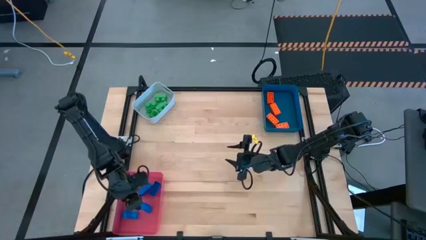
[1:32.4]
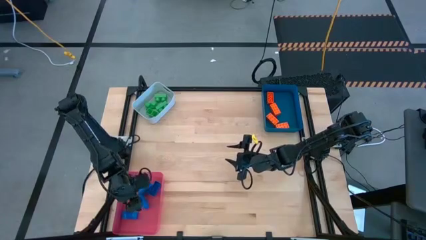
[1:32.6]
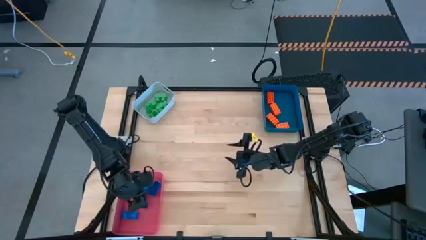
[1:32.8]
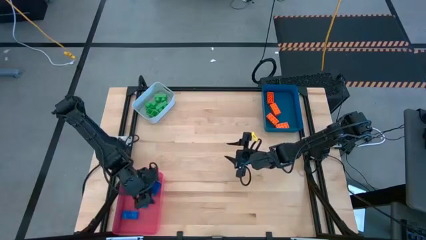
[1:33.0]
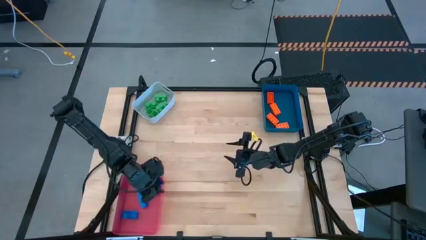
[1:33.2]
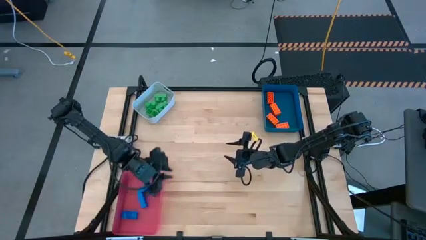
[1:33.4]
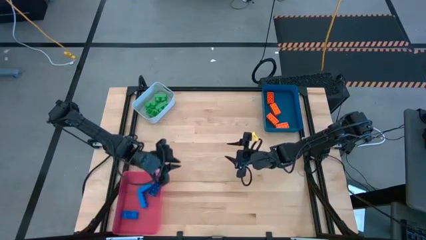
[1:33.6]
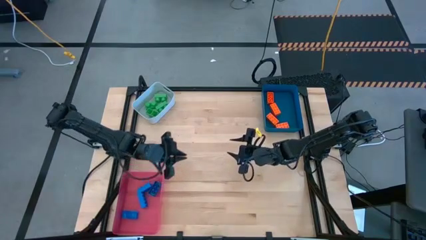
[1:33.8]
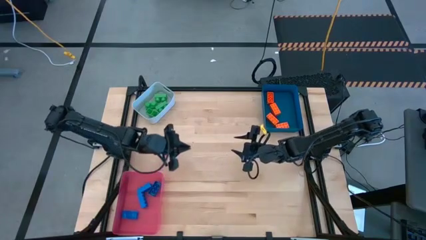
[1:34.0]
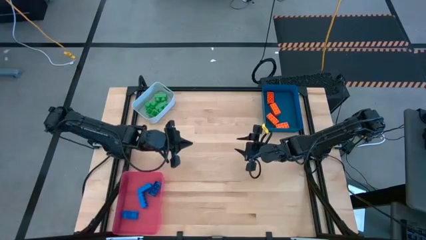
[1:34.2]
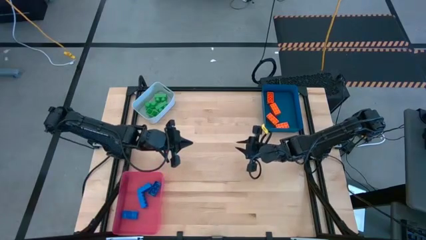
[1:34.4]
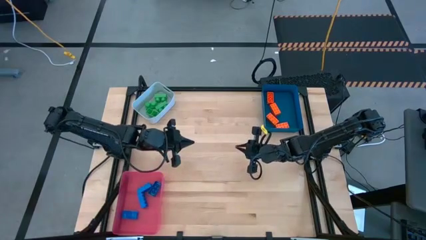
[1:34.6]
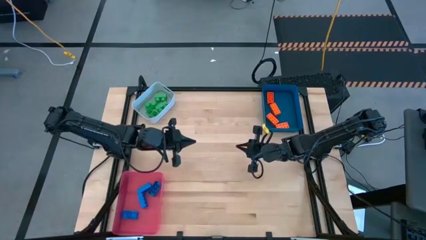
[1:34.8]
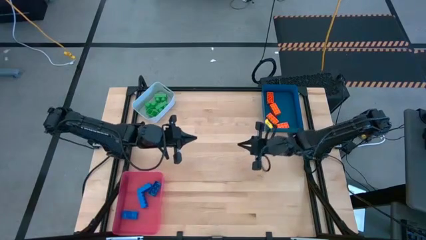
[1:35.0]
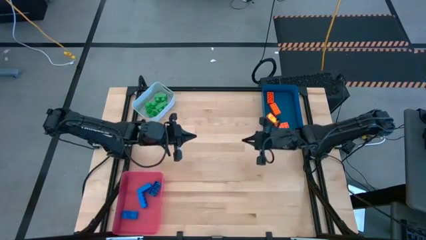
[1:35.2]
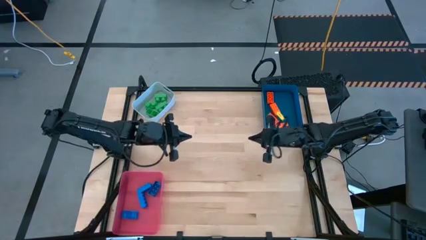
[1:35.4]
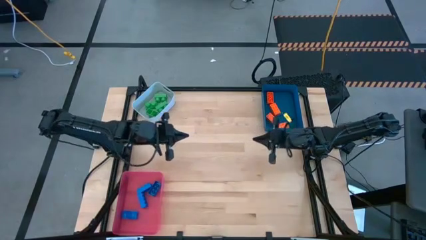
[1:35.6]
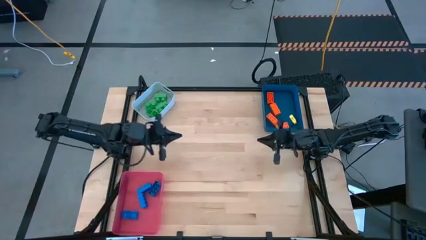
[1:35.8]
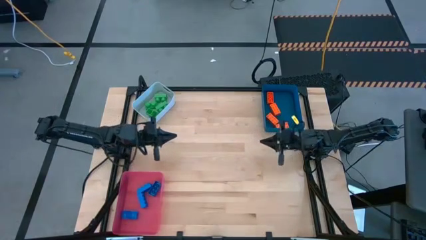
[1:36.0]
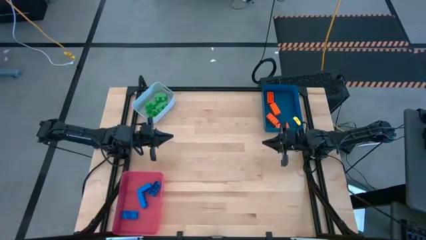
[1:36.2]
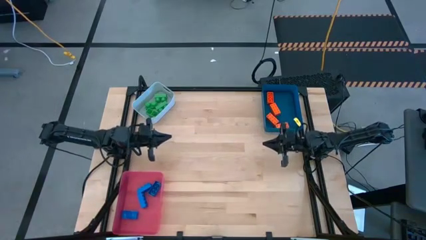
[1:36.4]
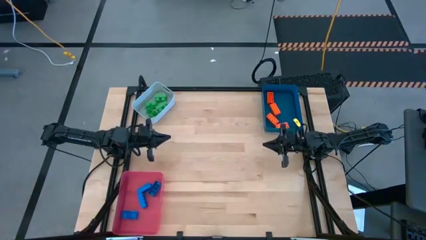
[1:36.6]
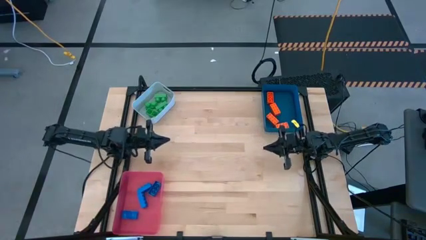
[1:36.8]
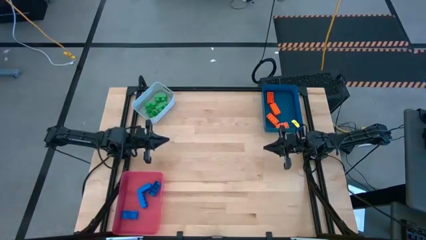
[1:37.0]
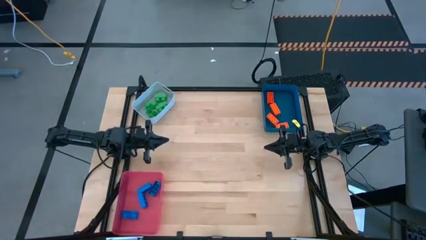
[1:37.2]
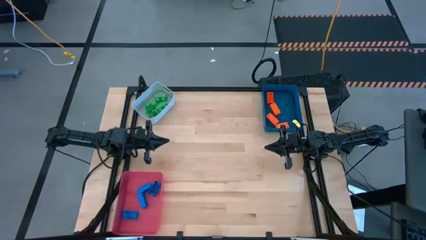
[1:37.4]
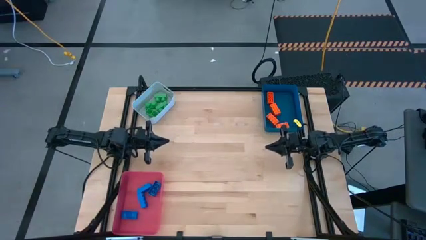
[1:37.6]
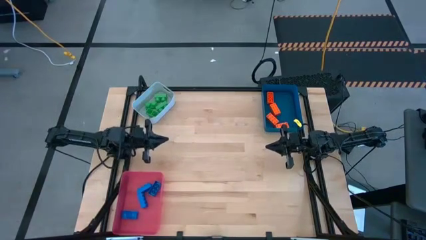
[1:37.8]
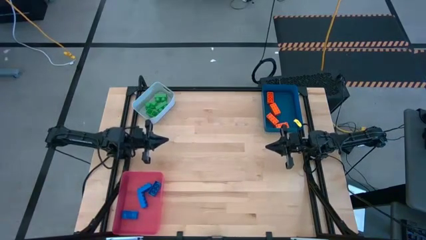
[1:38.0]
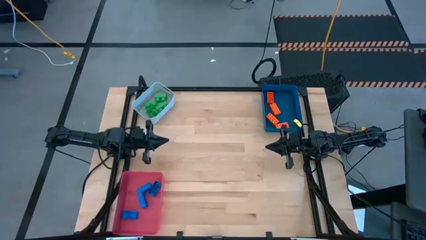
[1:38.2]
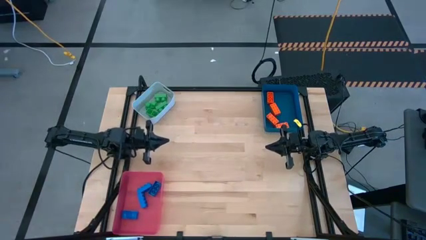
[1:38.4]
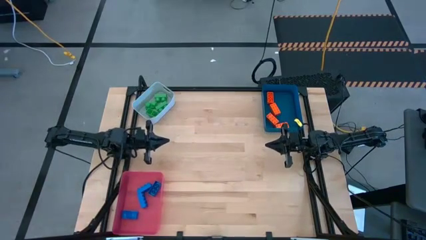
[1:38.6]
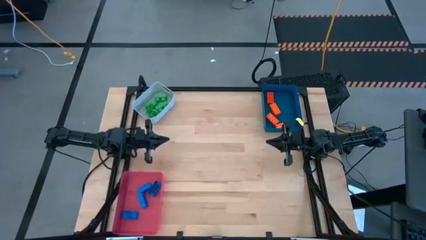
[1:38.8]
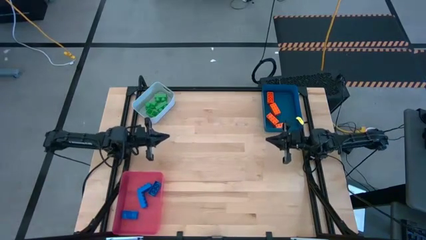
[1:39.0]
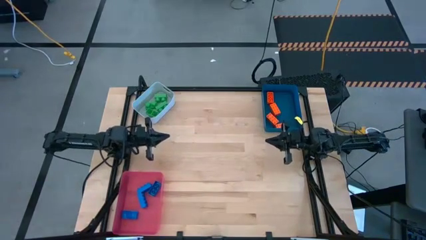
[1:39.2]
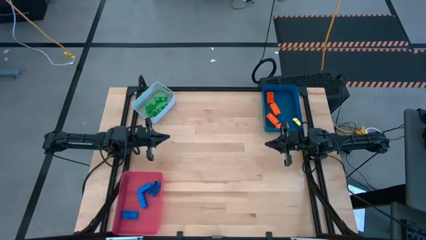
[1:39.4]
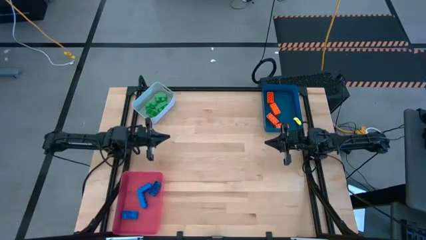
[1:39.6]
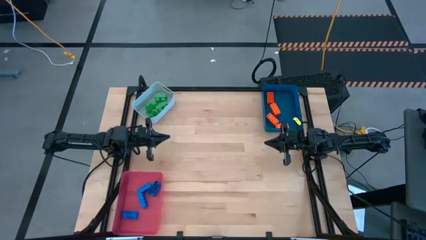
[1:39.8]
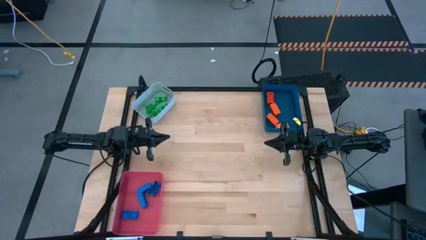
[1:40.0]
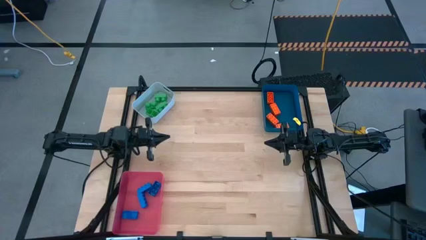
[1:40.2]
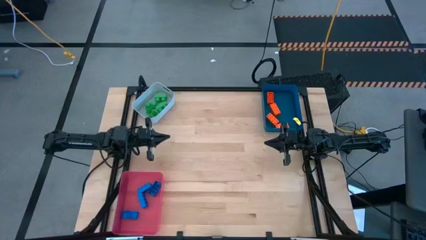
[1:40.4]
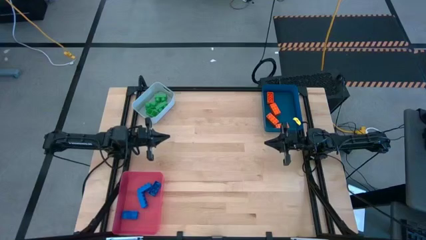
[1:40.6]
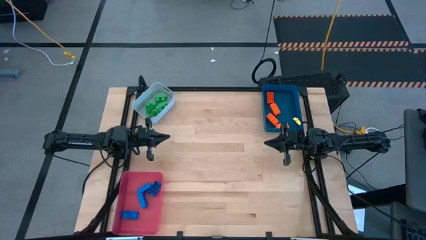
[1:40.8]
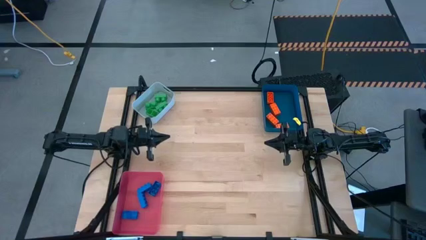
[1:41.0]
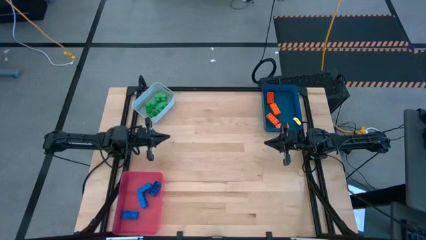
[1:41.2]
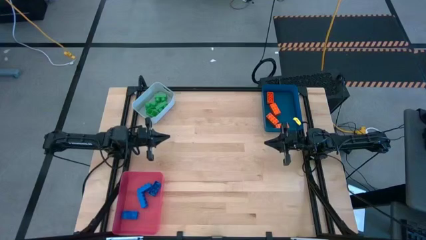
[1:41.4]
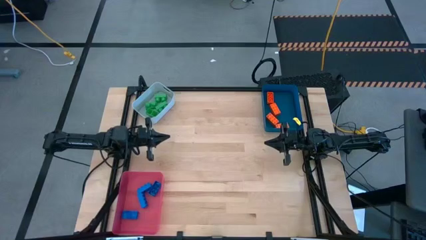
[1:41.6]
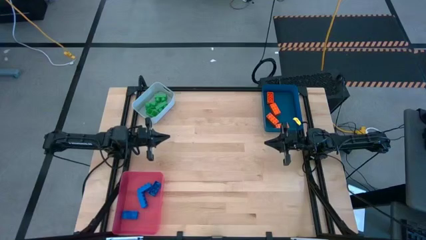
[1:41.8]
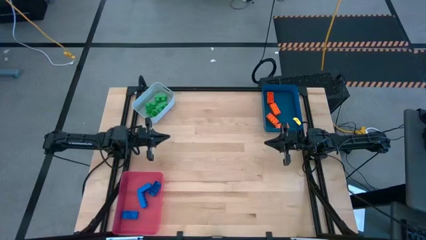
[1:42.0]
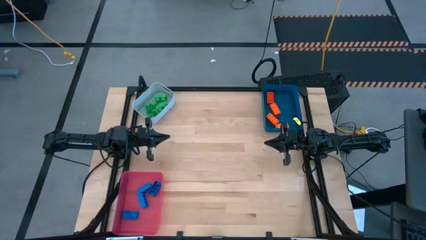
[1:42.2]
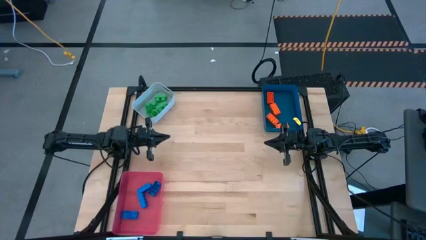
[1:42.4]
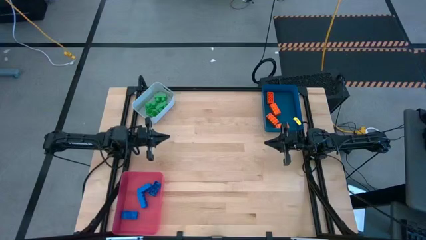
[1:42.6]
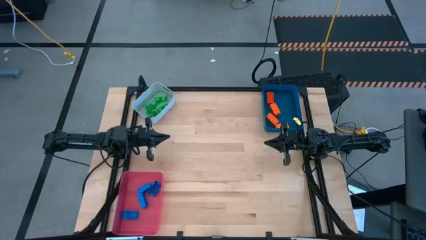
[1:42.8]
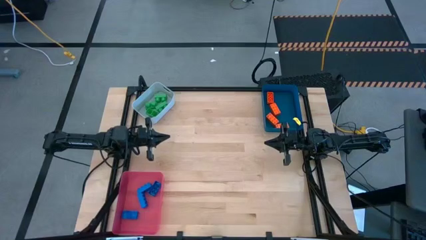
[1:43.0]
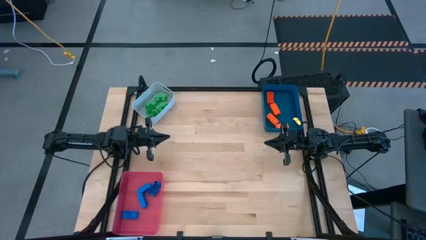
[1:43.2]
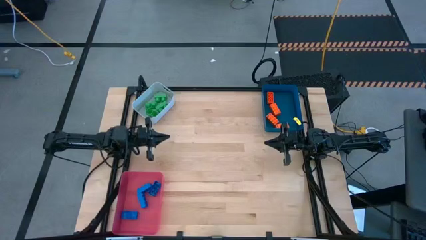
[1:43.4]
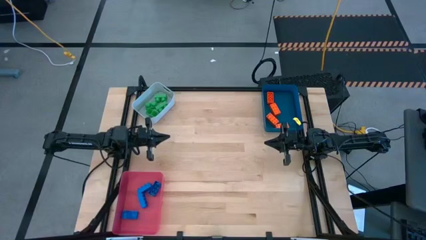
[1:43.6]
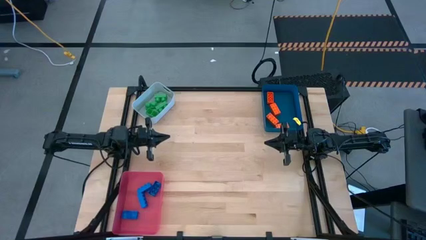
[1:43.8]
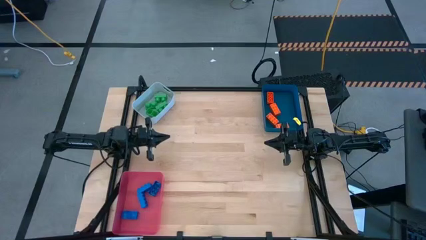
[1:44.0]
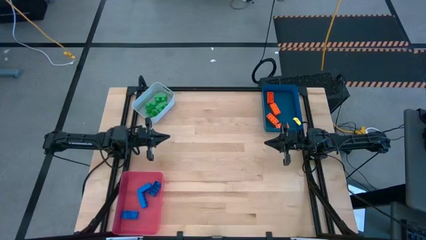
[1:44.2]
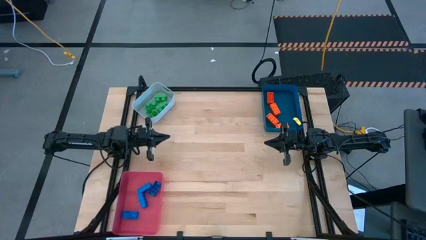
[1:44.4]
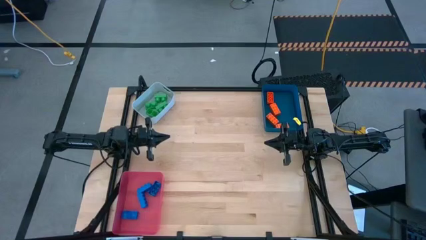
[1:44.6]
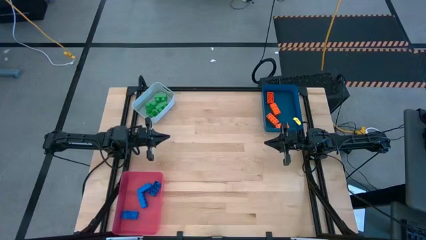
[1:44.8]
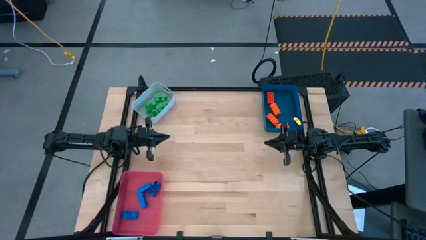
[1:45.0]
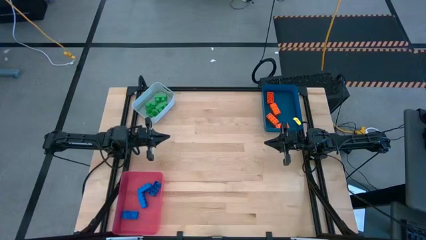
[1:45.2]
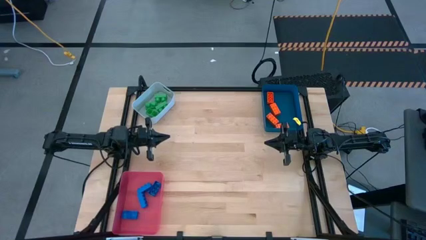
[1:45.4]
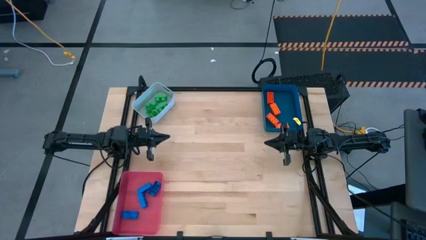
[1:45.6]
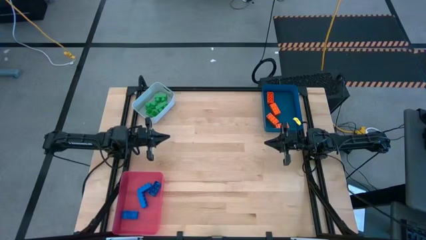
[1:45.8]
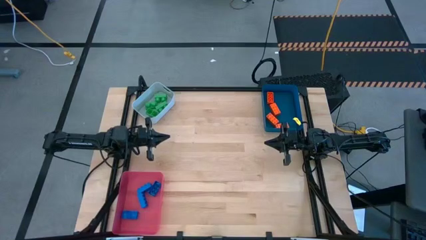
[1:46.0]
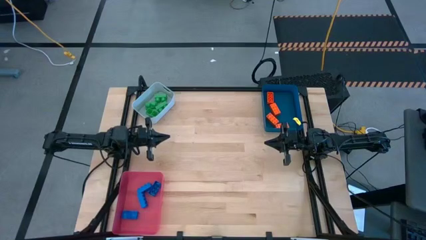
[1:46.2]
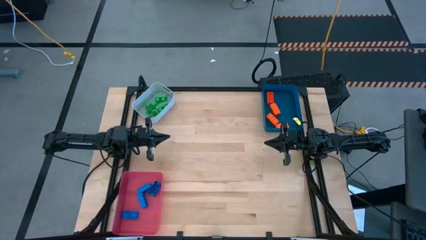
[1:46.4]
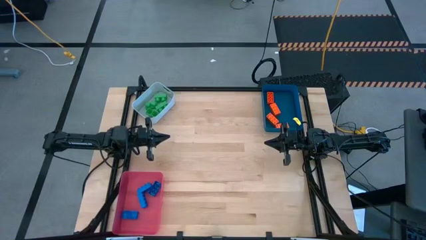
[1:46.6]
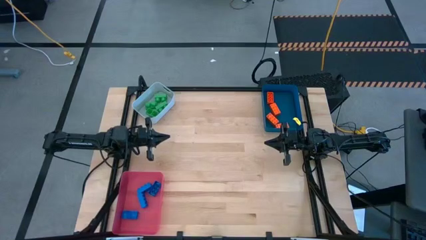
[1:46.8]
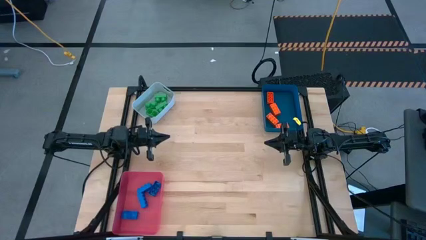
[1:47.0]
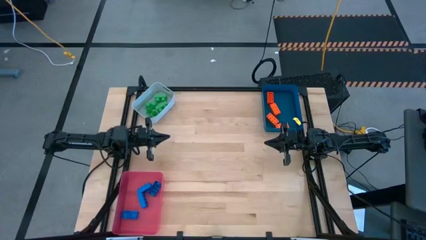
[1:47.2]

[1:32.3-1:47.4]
Task: Sort & place blocks by color
Return to Home Position

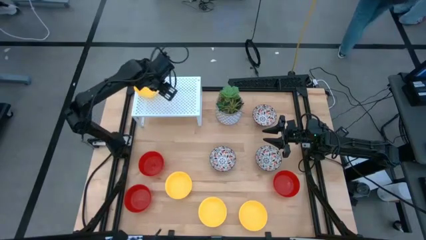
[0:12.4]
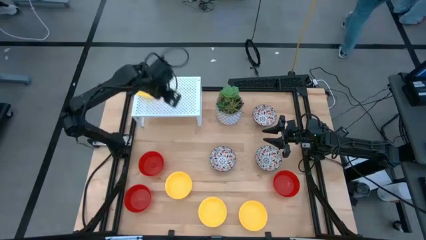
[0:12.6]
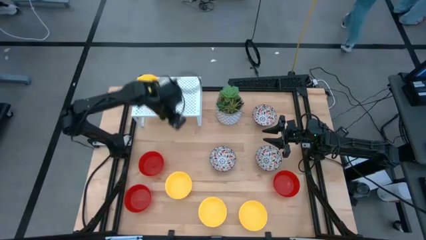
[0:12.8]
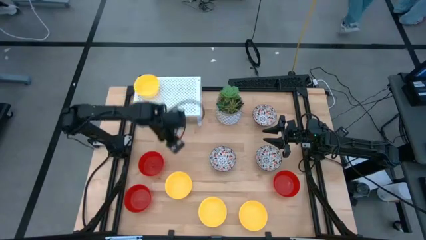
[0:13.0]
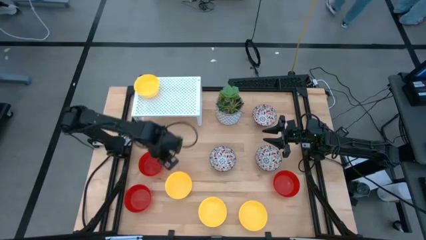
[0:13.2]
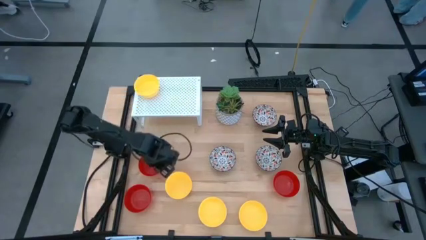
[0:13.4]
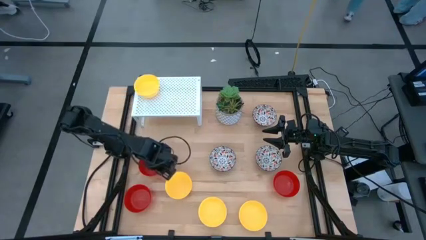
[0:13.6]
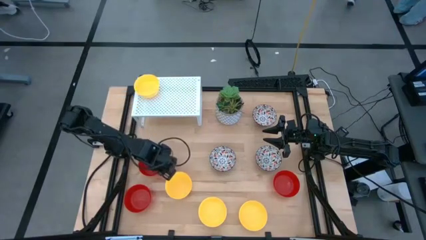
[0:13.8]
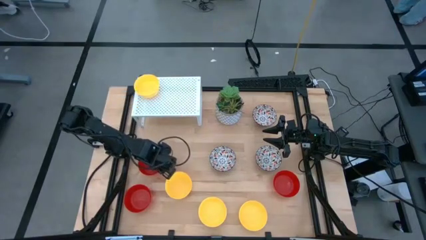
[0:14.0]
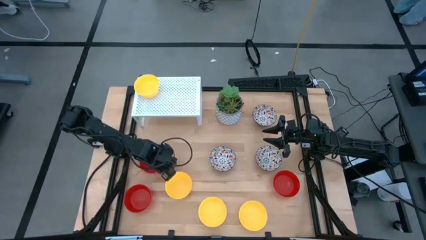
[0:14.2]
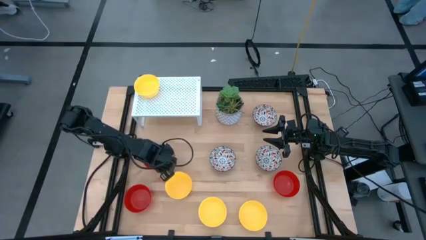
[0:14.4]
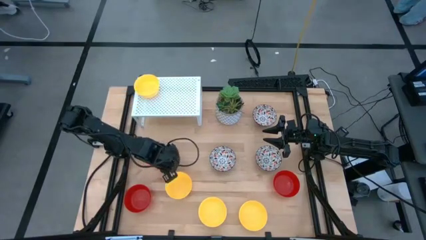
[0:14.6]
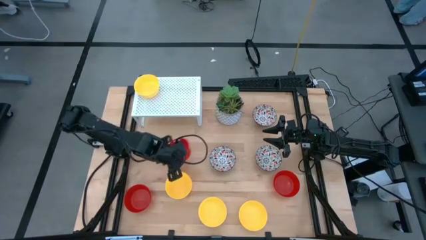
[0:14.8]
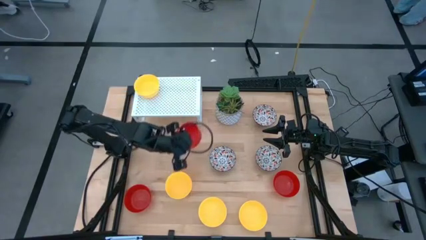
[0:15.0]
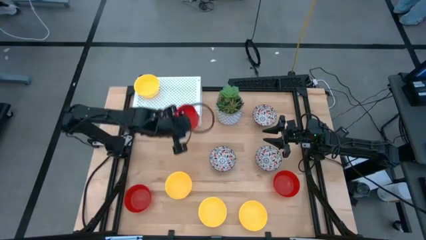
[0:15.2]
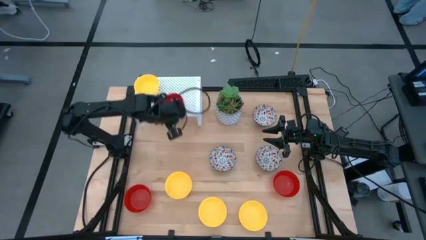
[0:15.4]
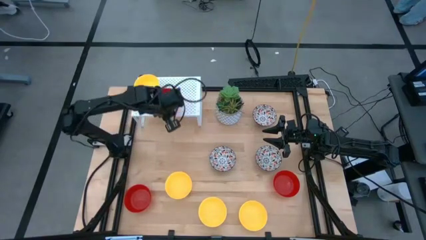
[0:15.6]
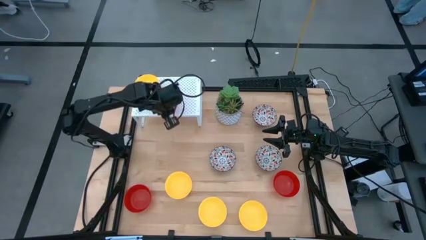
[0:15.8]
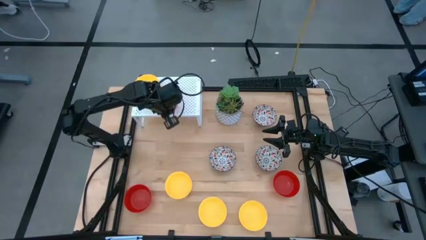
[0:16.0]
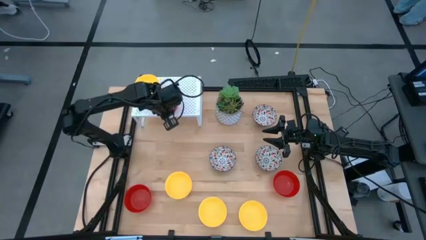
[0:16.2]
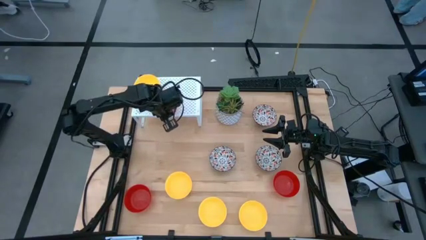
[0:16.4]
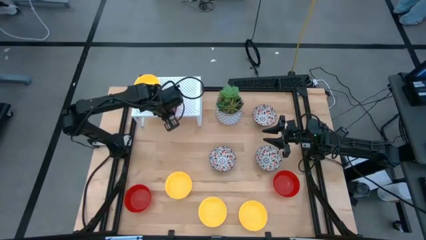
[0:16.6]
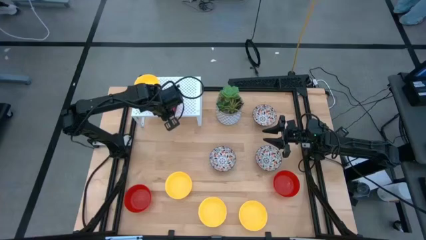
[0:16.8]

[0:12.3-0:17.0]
Task: Pick & Place Mini bowls
Put the red bowl on the shelf
